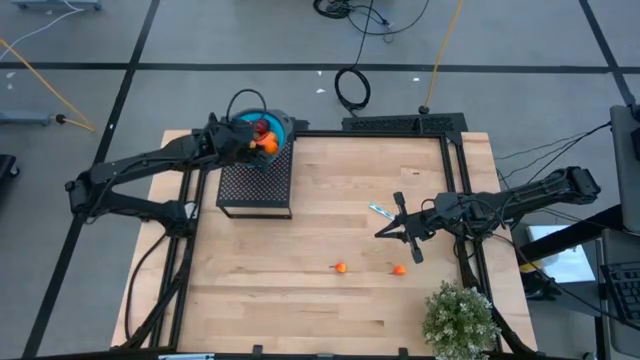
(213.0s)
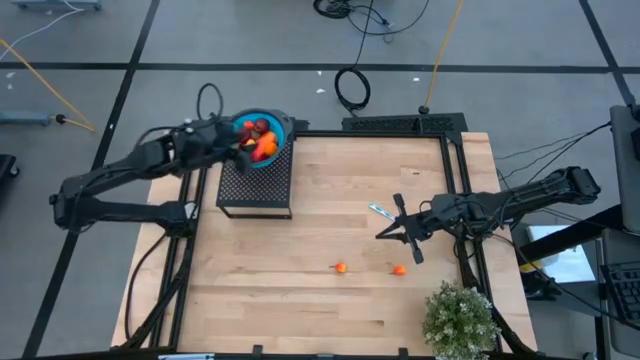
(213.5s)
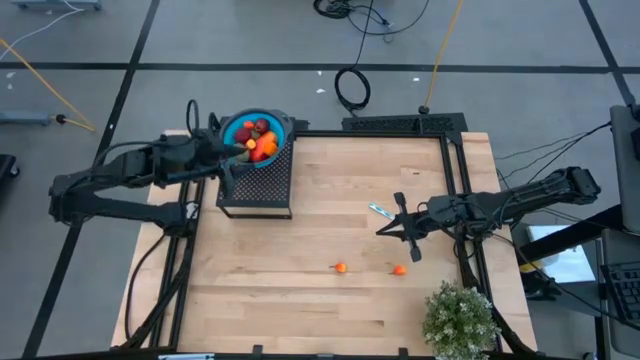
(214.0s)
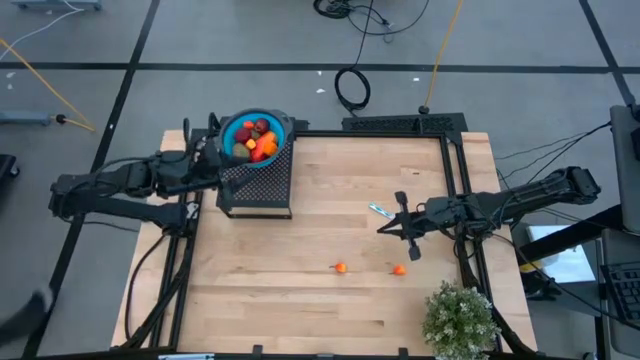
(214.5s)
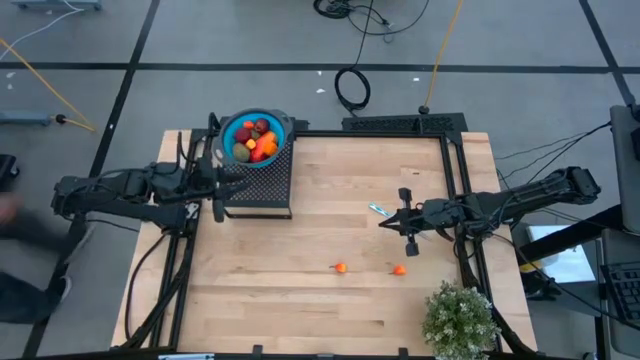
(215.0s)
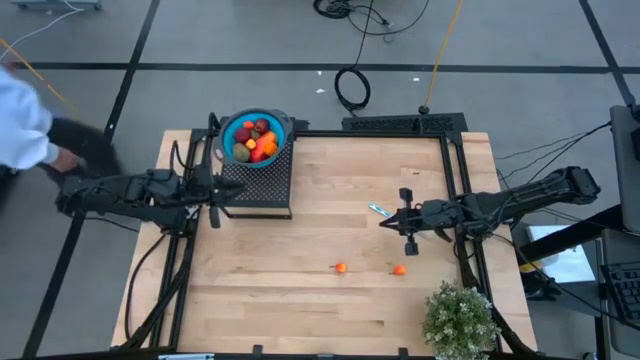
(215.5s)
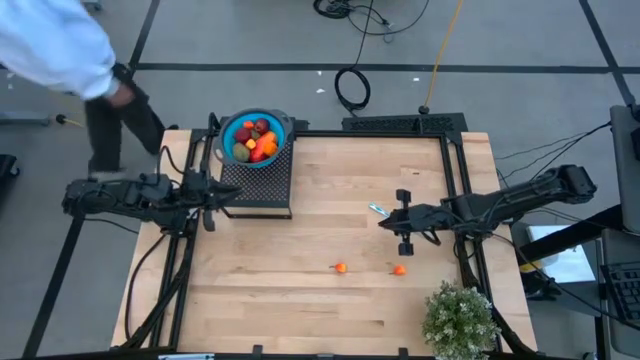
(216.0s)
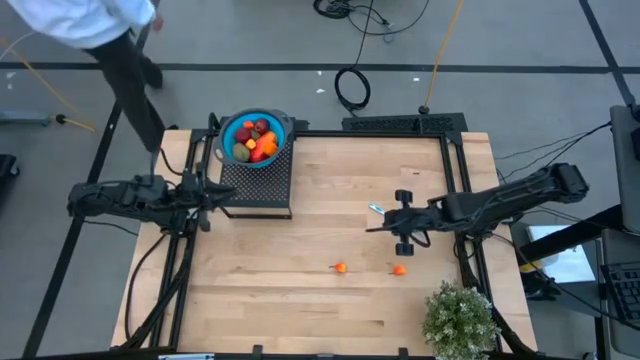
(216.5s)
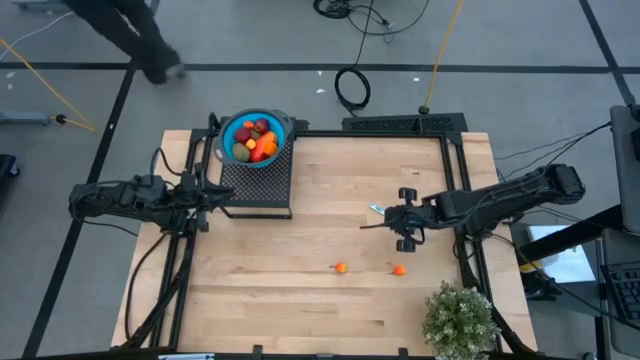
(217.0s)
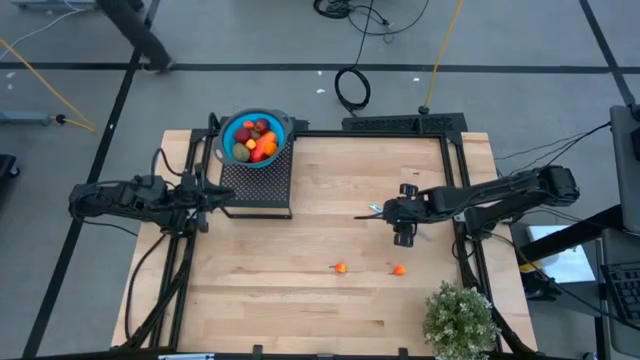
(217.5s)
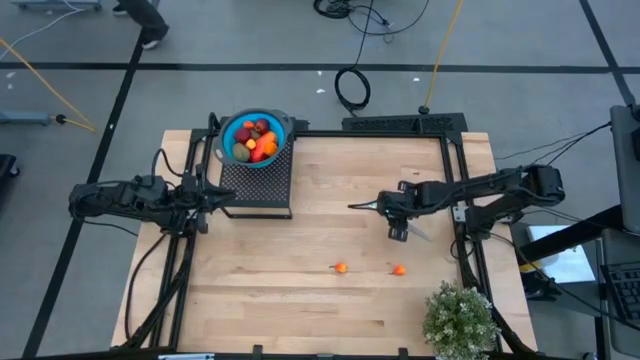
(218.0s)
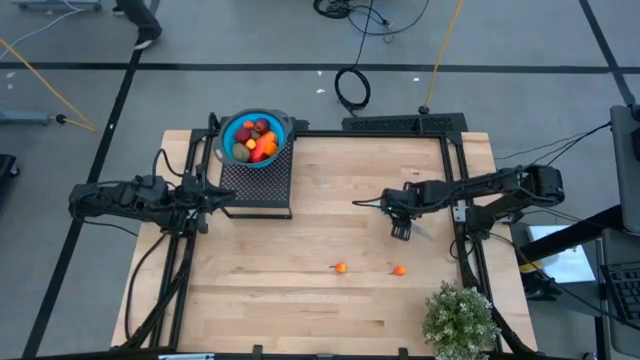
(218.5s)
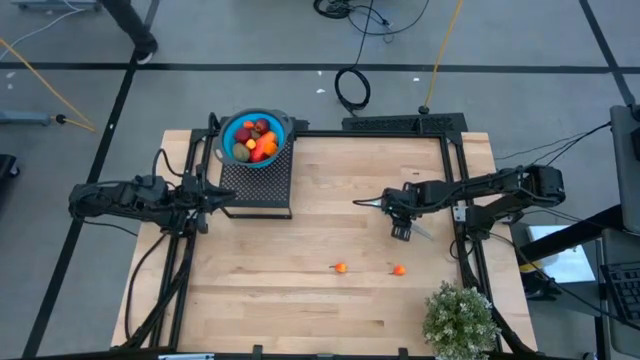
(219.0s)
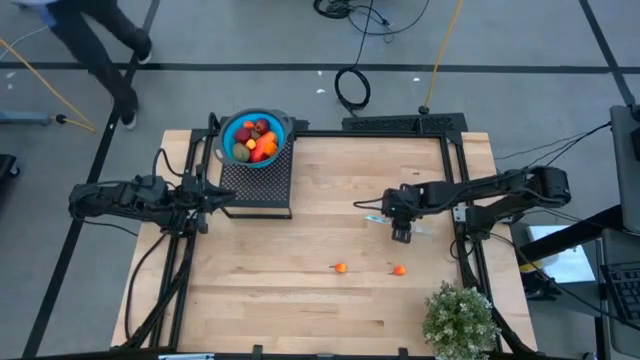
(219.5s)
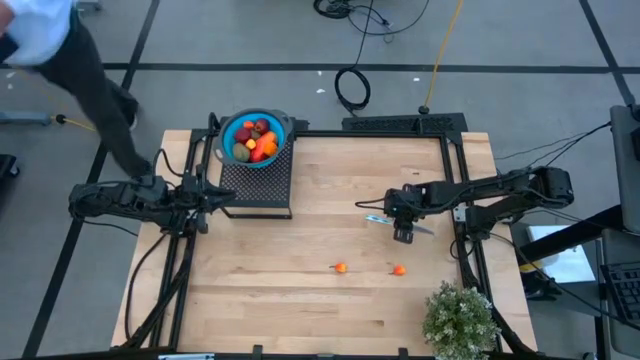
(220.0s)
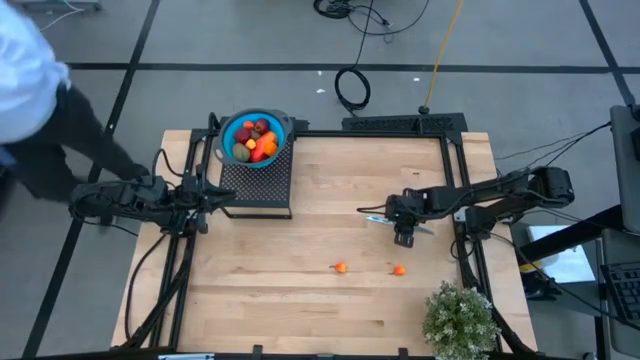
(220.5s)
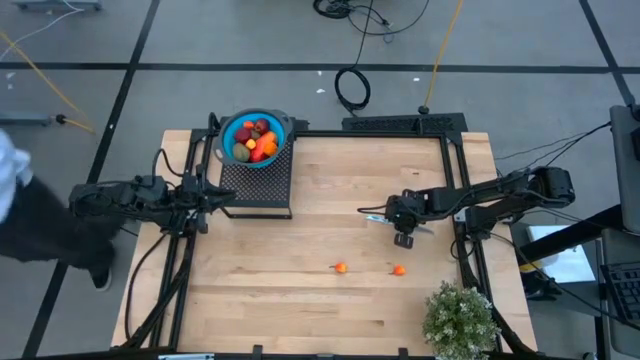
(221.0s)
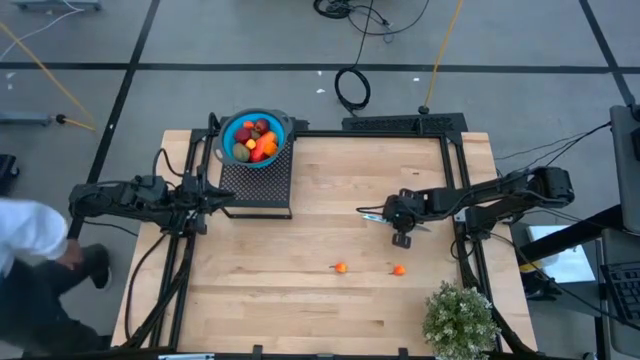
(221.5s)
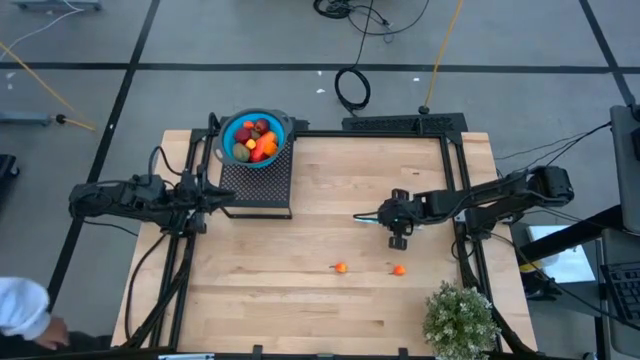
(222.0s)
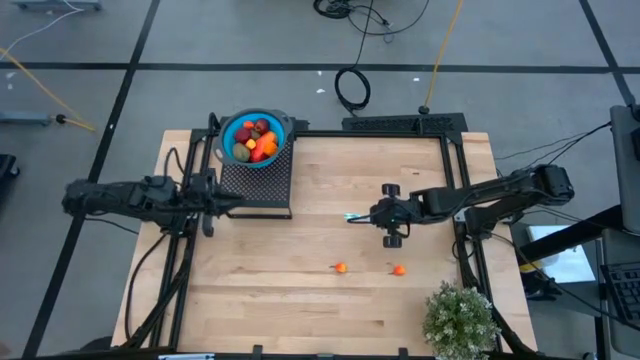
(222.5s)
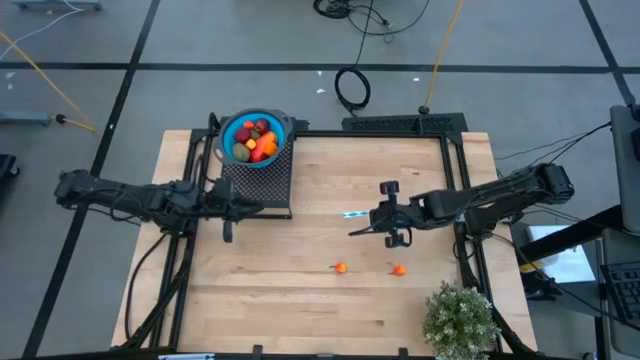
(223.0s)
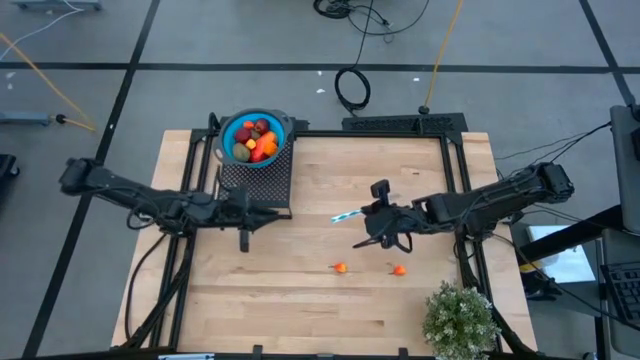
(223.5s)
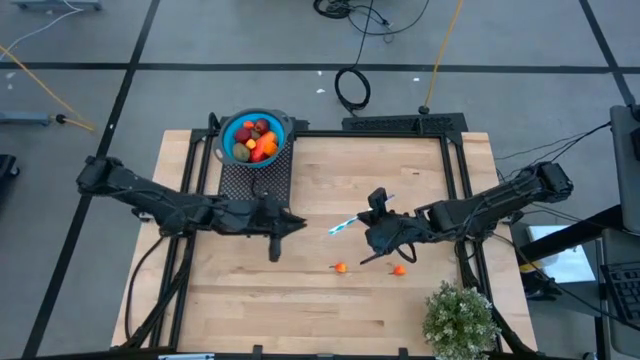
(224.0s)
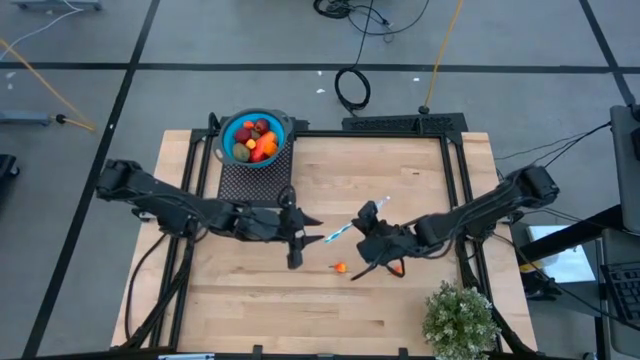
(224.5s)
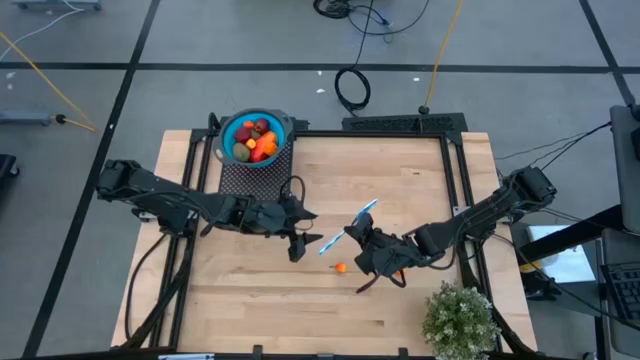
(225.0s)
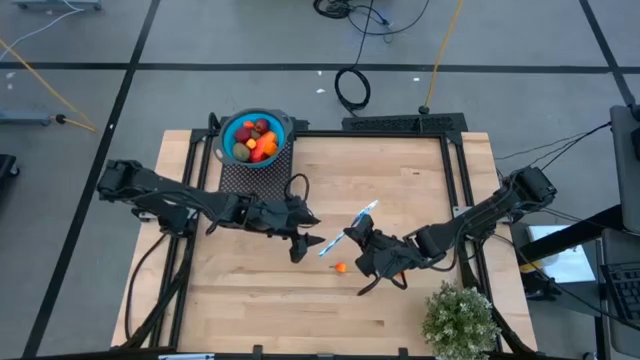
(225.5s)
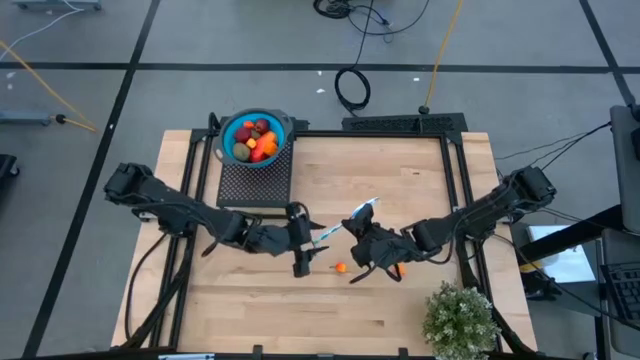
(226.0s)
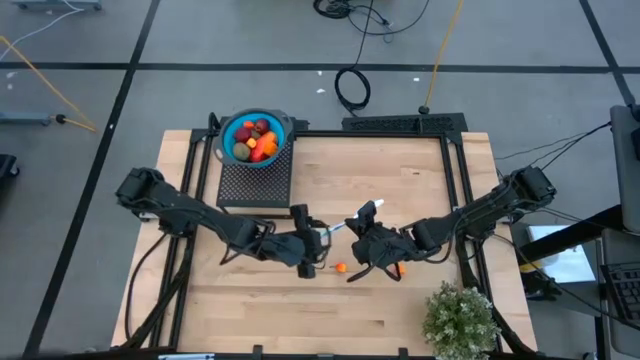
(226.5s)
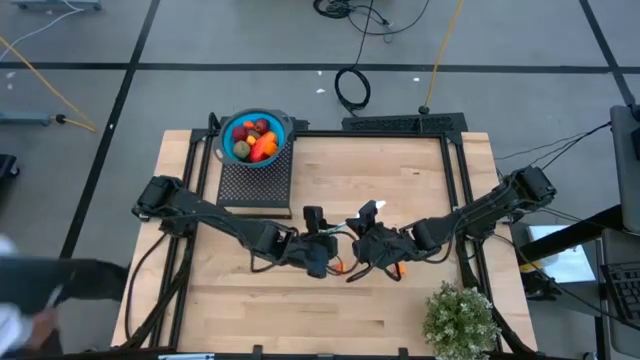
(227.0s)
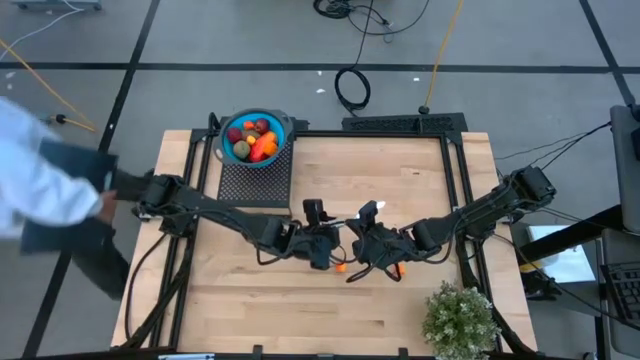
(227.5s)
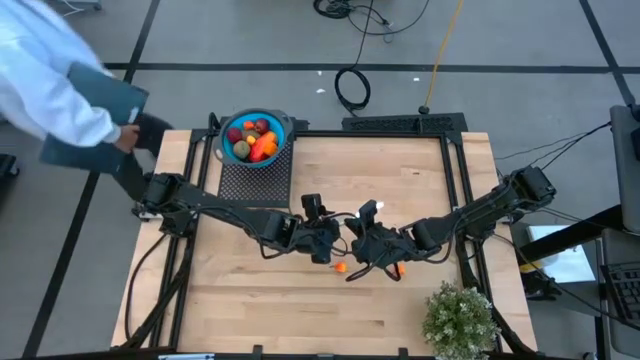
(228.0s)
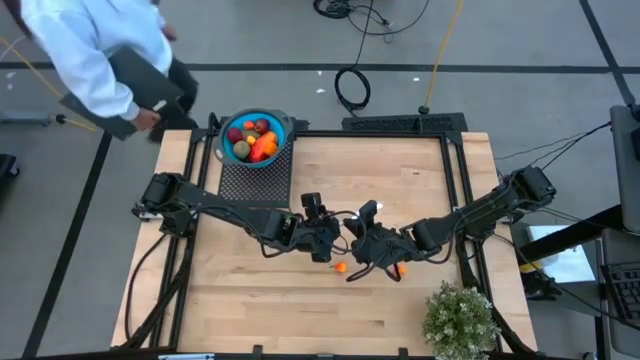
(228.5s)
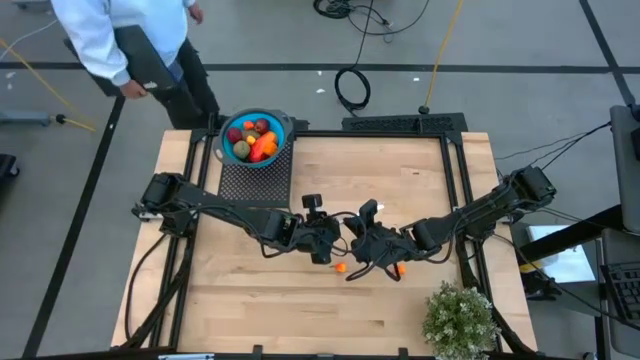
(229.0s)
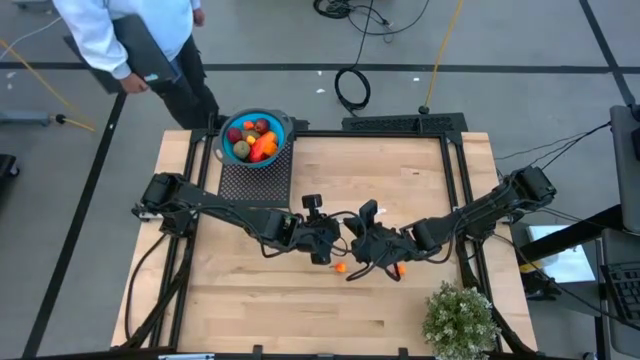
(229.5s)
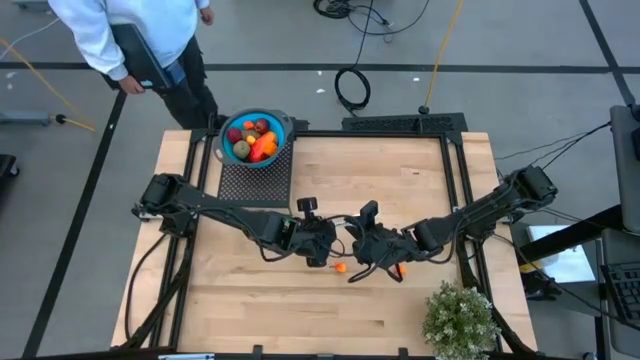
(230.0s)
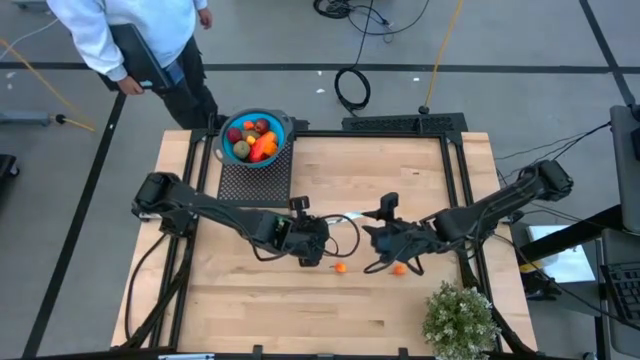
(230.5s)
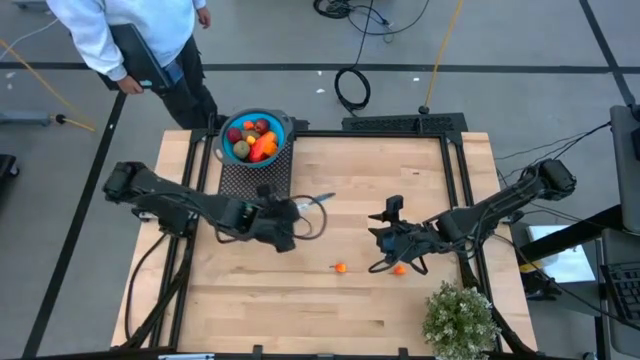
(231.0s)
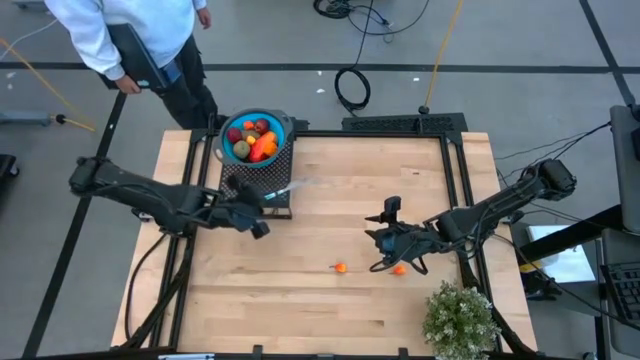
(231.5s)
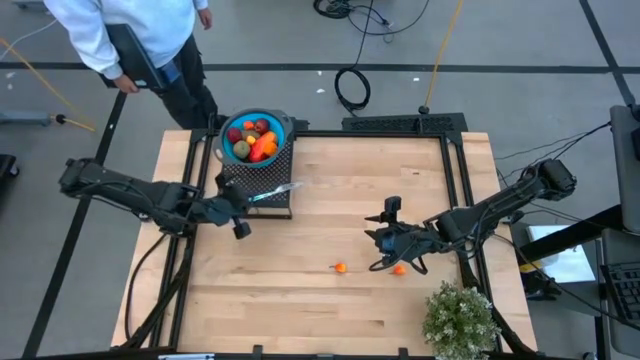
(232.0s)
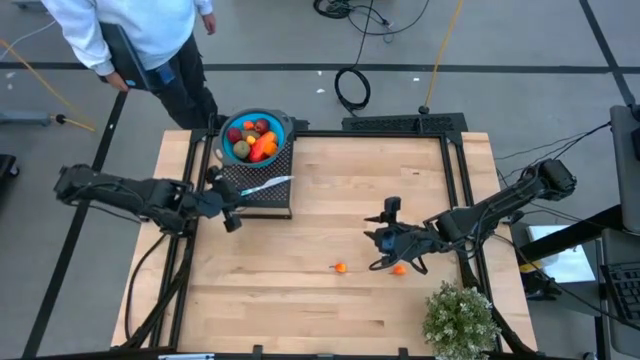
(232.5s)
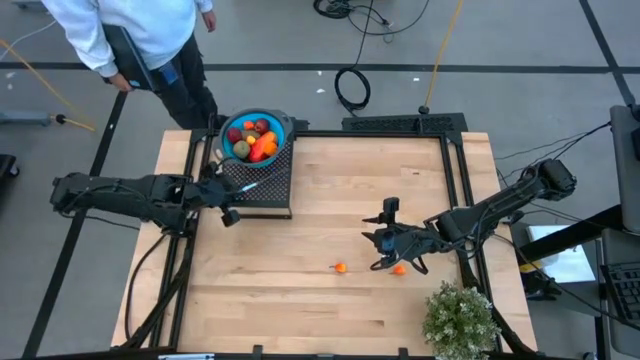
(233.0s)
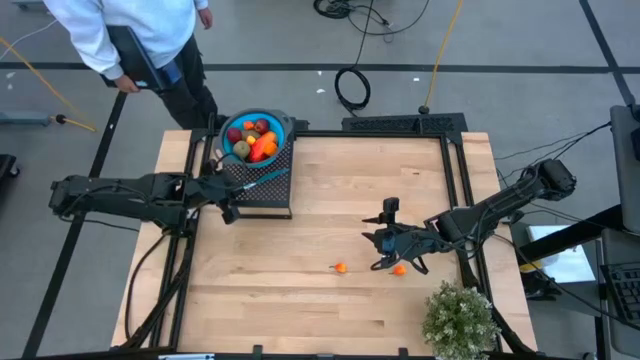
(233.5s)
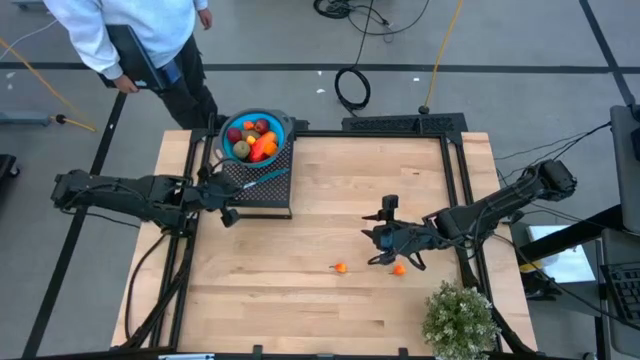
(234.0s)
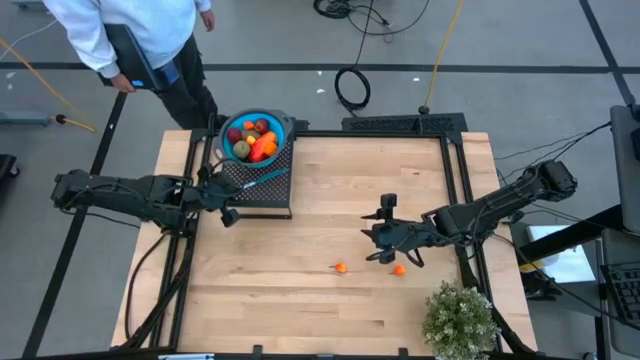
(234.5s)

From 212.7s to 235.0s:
Task: Pick & Place Fruit
Put the blue knife on the shelf
